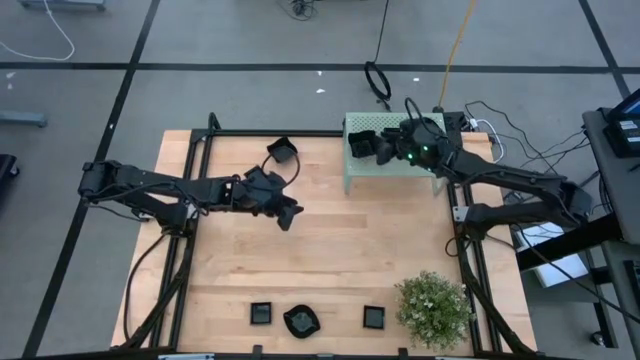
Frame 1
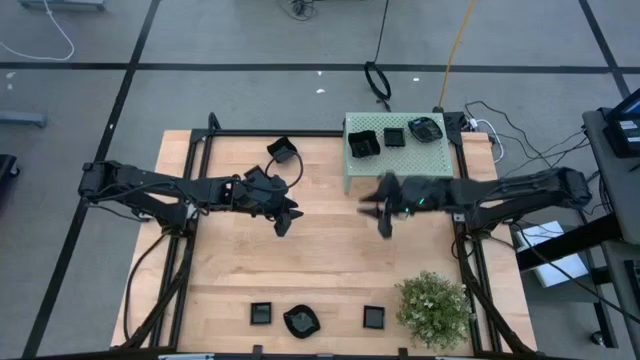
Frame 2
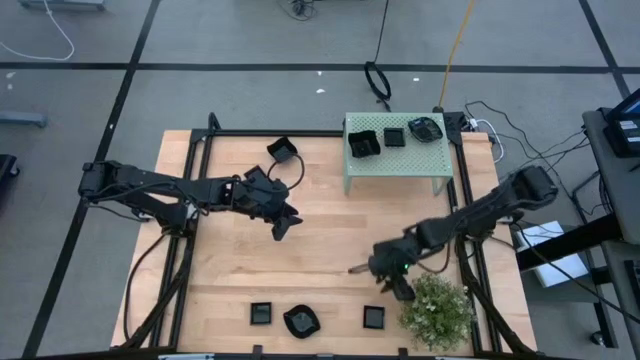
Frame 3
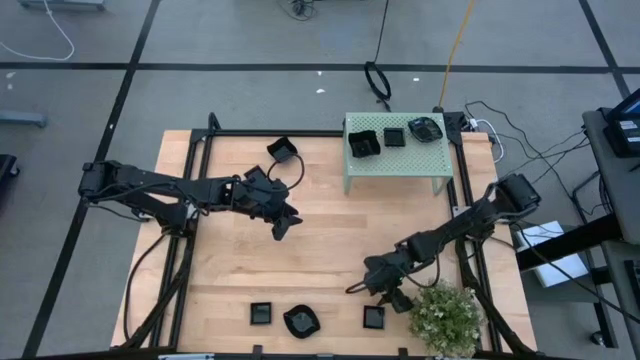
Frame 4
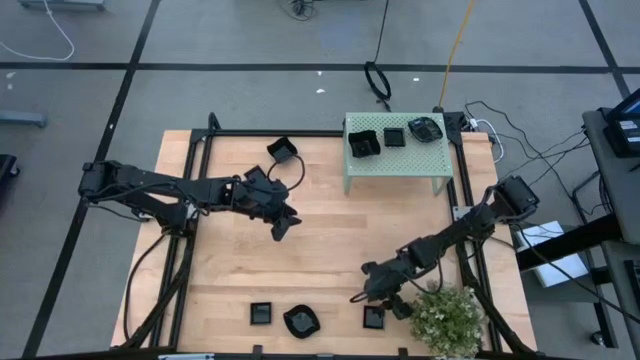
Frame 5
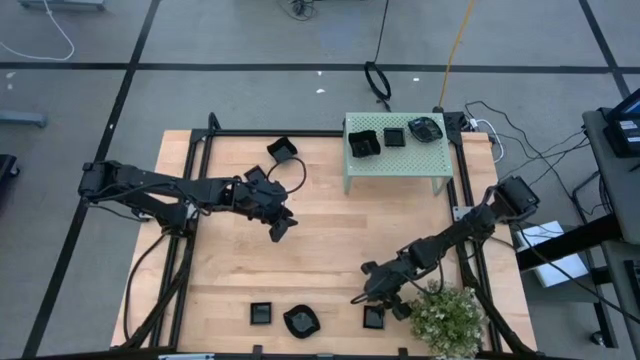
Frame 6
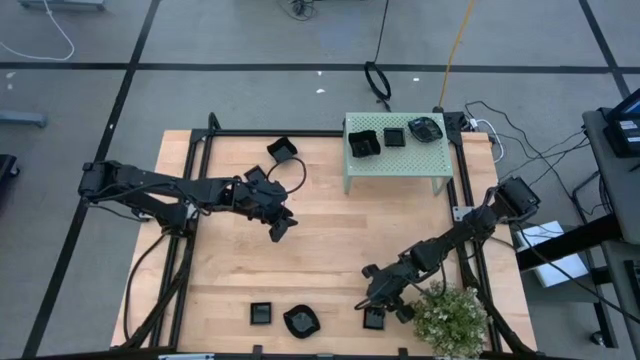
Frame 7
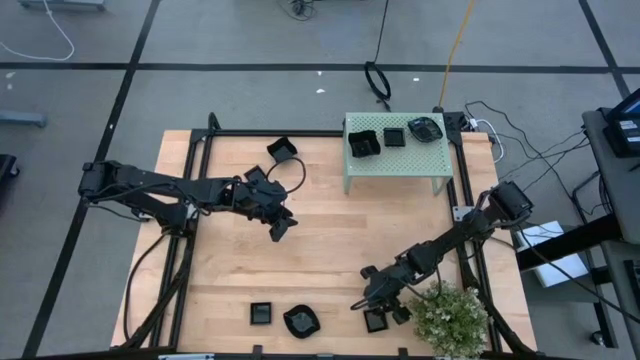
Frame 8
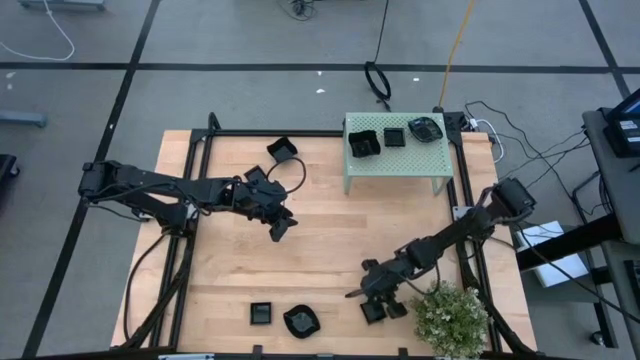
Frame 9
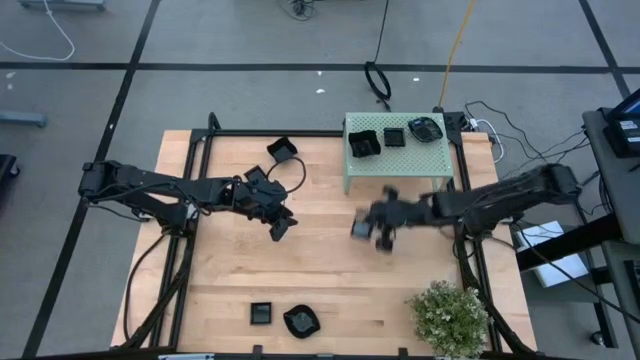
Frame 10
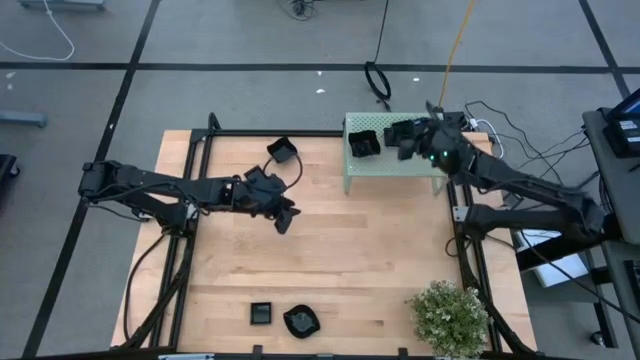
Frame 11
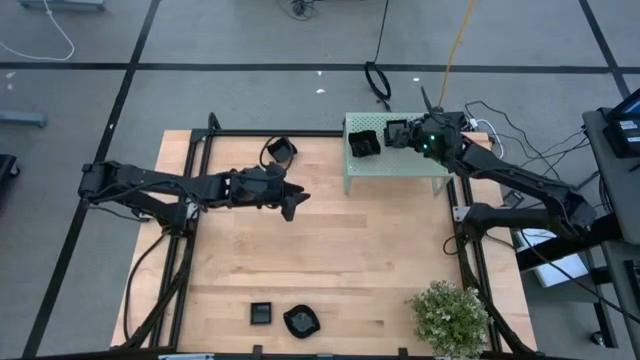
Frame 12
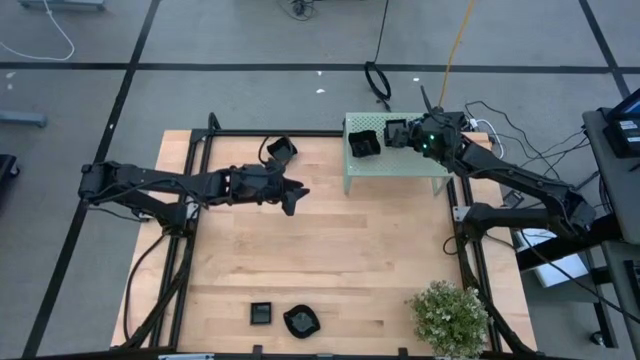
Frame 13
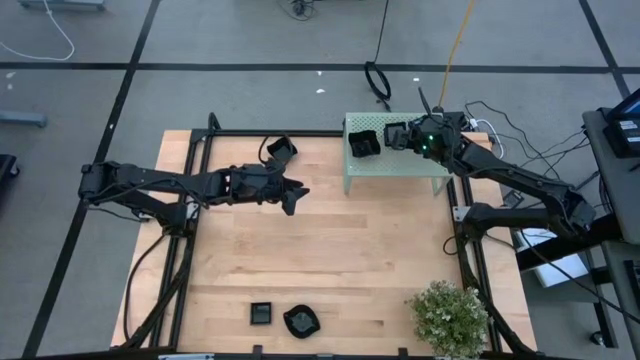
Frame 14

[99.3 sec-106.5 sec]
Task: Pick & Place Mini shaped plates
Stack the black square plate on top of the square plate on the shelf

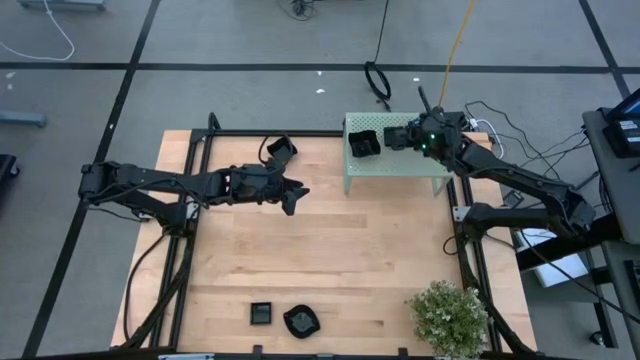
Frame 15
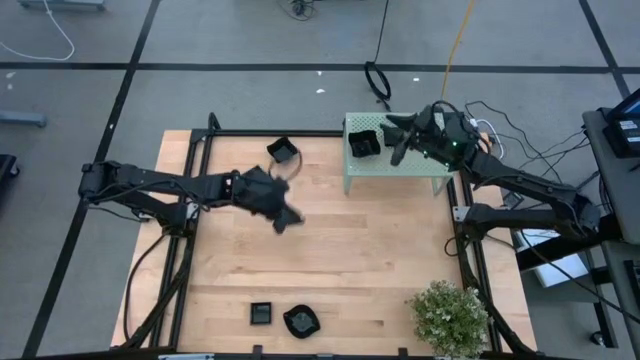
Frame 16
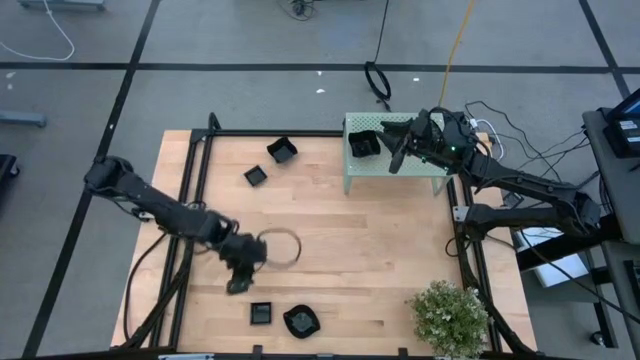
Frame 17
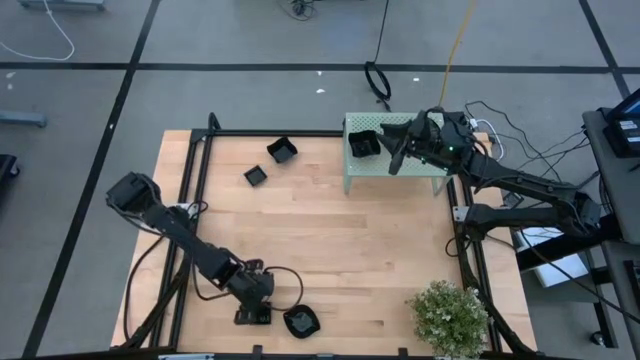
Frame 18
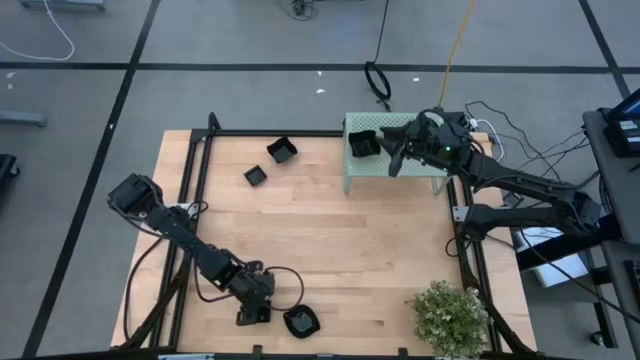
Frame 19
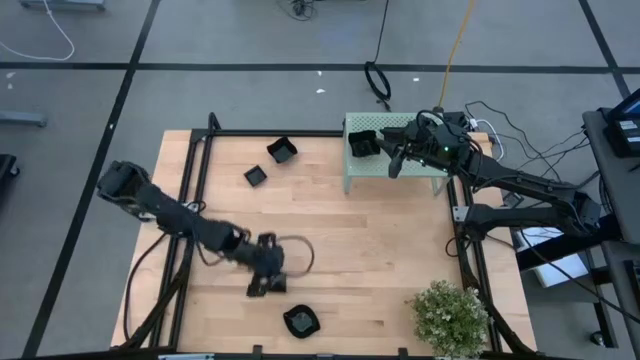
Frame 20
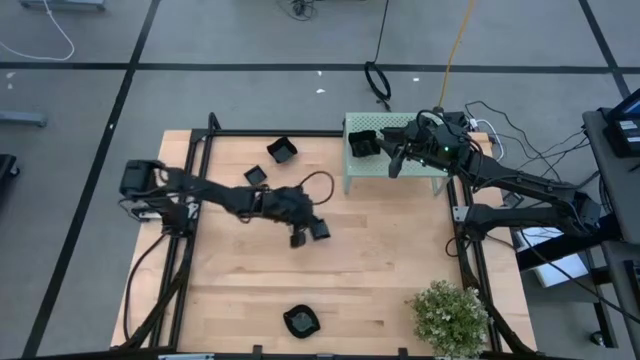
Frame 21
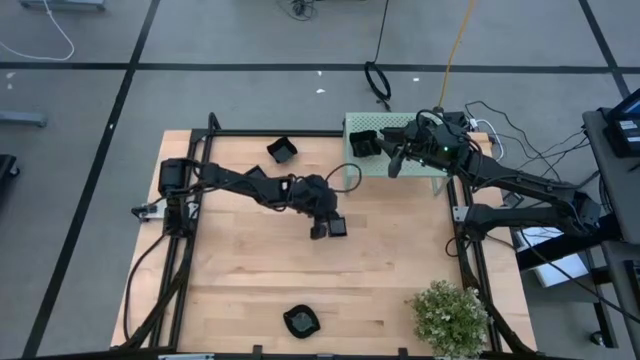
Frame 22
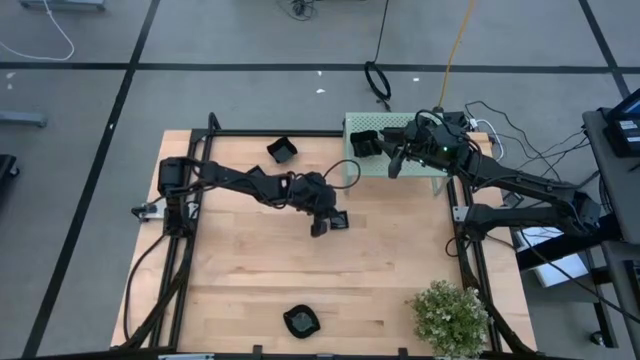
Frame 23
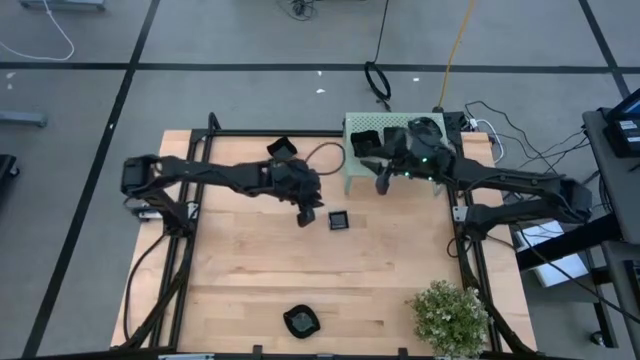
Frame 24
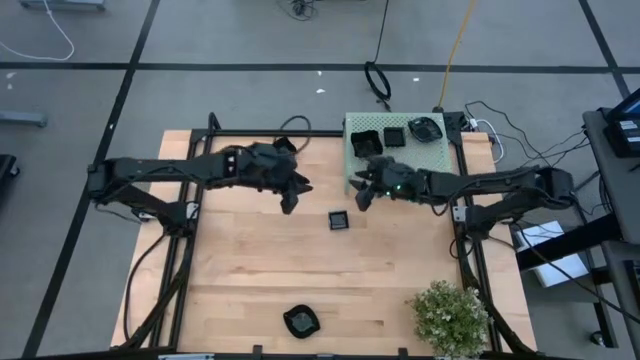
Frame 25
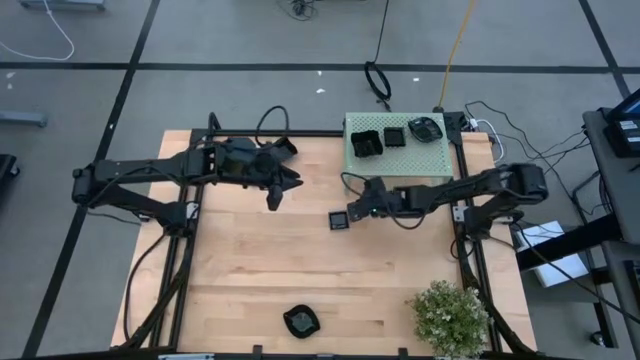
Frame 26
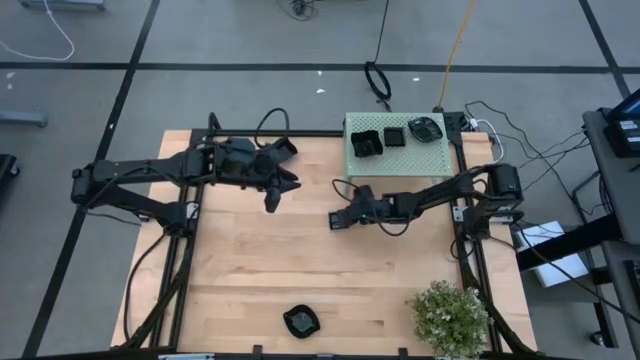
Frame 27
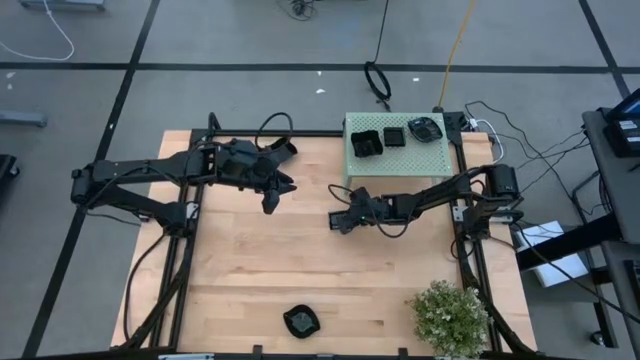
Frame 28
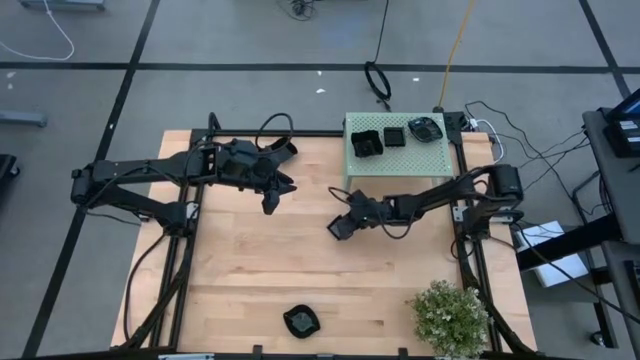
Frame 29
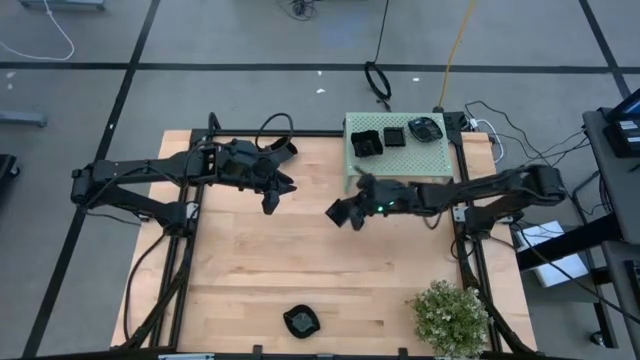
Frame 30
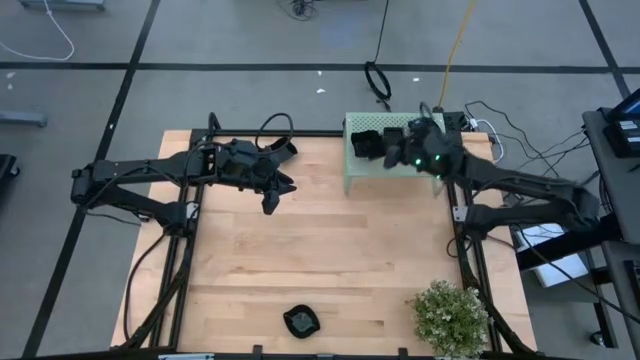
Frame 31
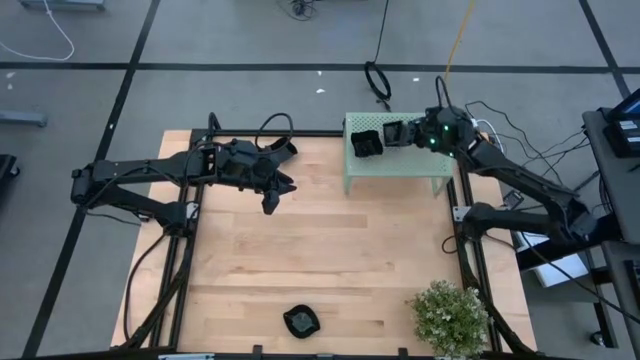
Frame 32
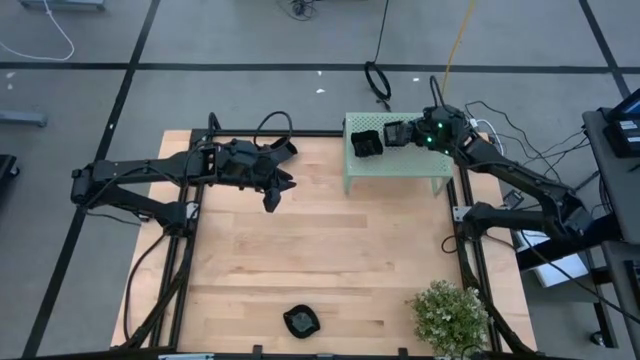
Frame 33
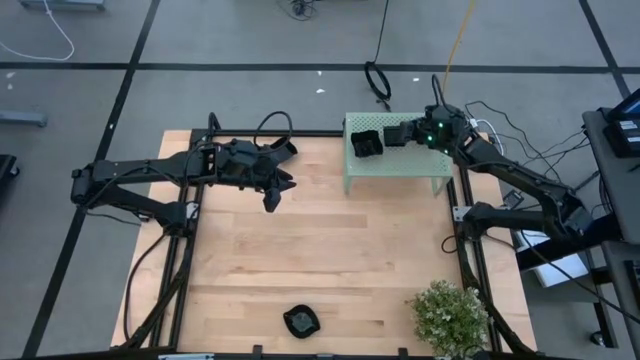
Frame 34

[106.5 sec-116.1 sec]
Stack the black square plate on top of the square plate on the shelf

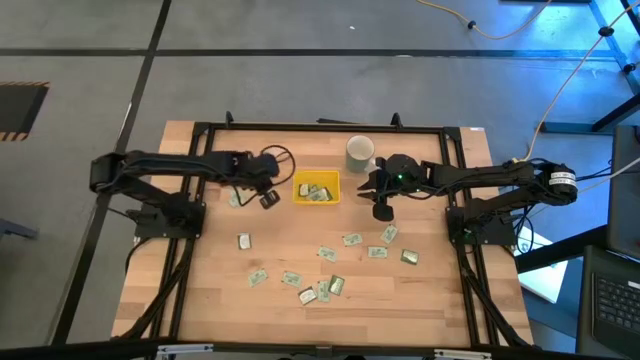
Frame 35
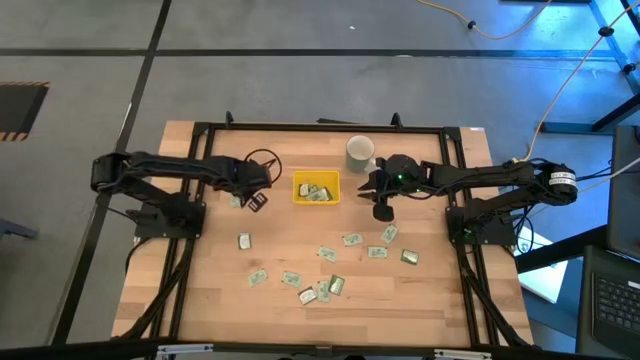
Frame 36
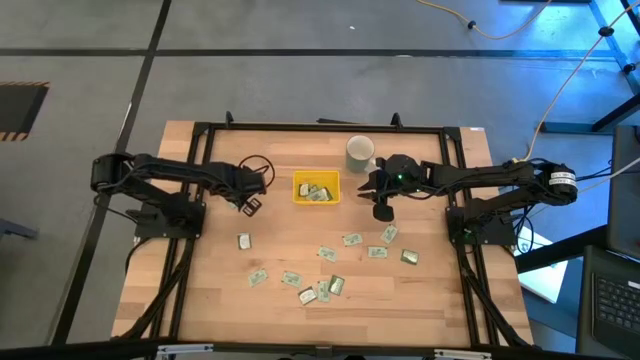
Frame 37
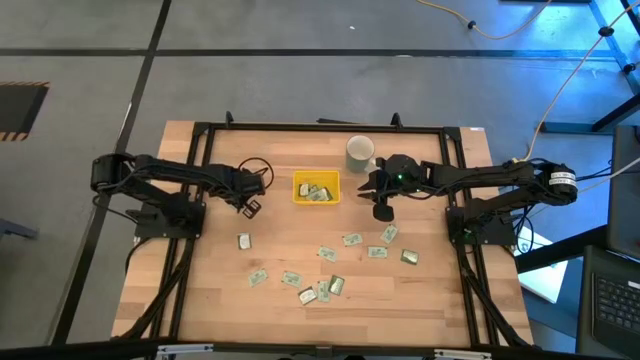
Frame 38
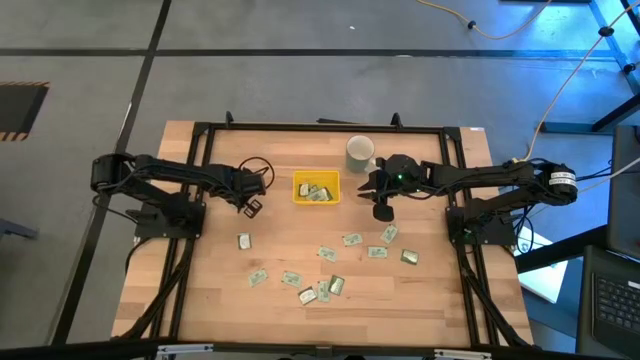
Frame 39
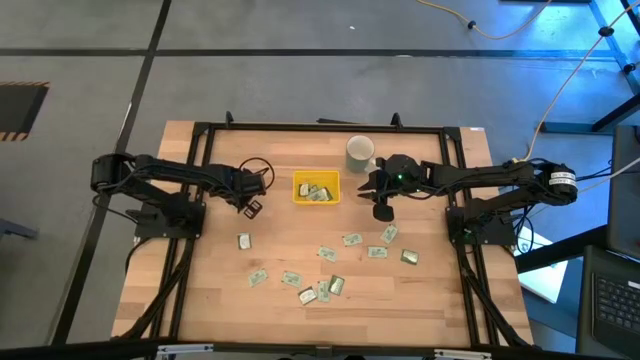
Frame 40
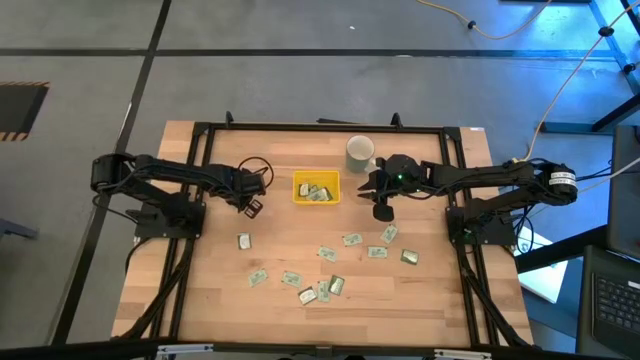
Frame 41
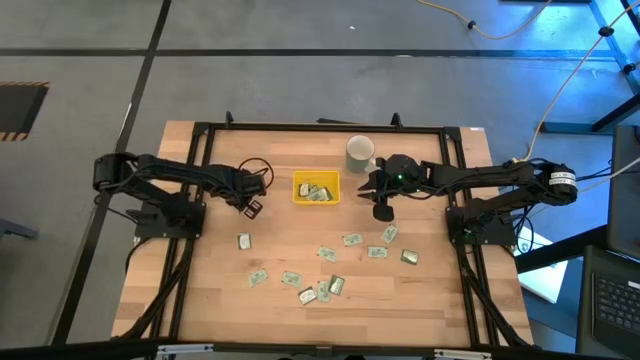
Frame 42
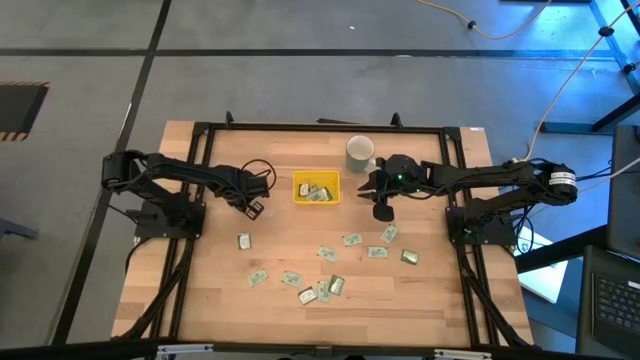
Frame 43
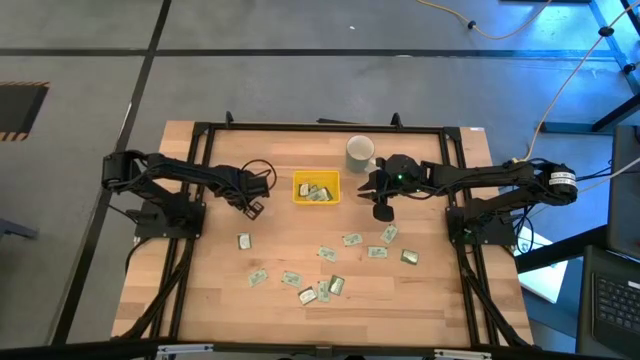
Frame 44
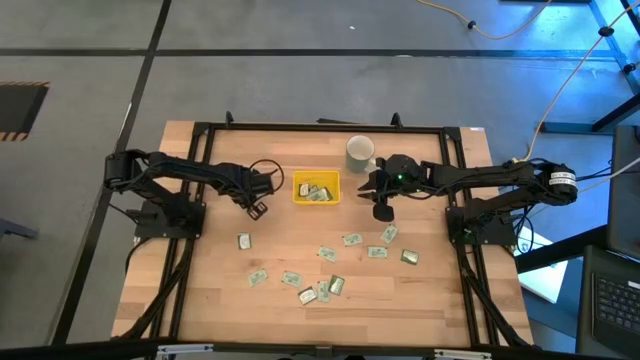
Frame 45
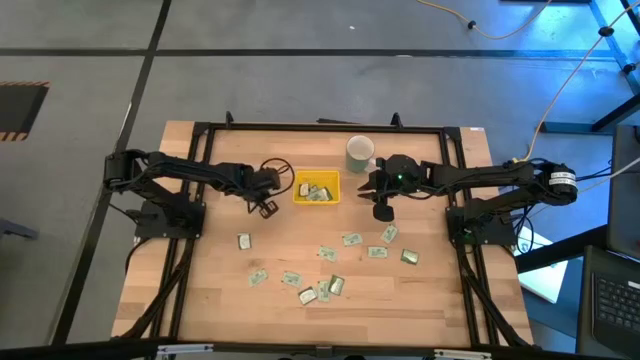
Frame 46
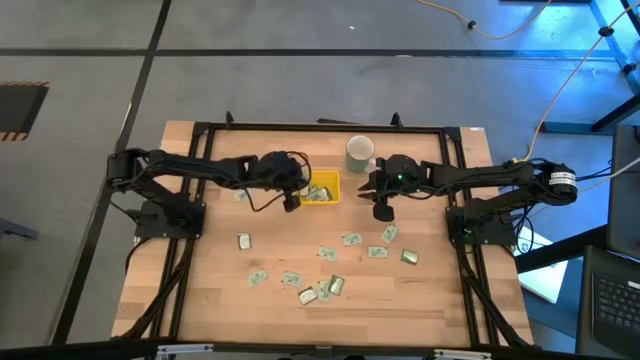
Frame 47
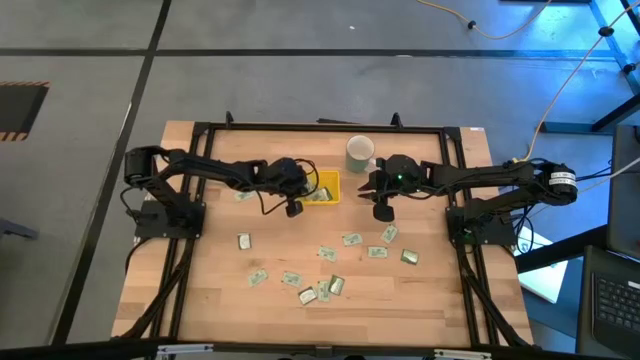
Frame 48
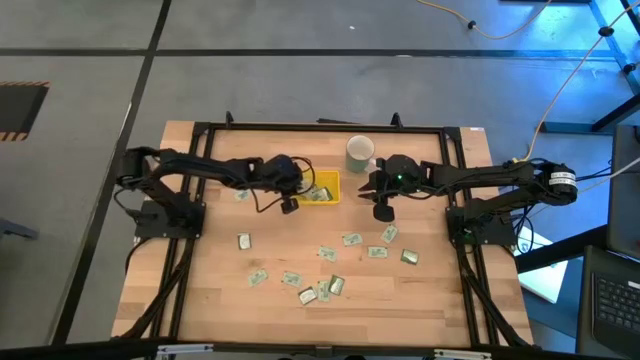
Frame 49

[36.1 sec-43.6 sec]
Task: Pick and place Stevia / Truvia into bins
Put the top left stevia tea packet into the yellow bin
